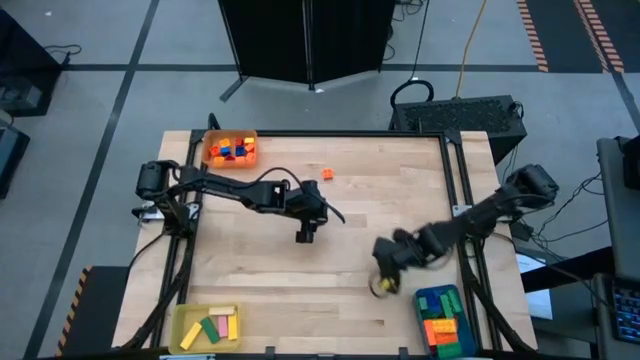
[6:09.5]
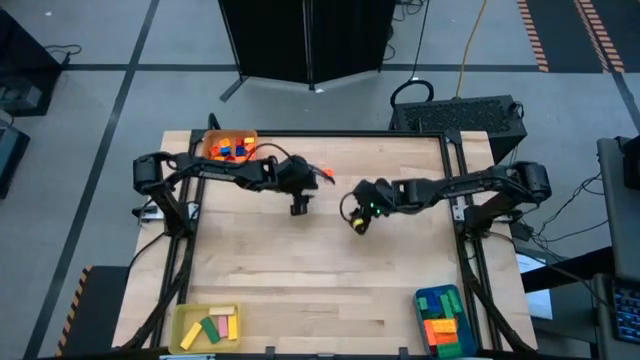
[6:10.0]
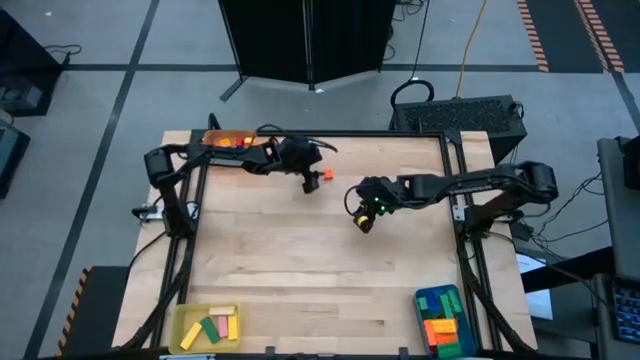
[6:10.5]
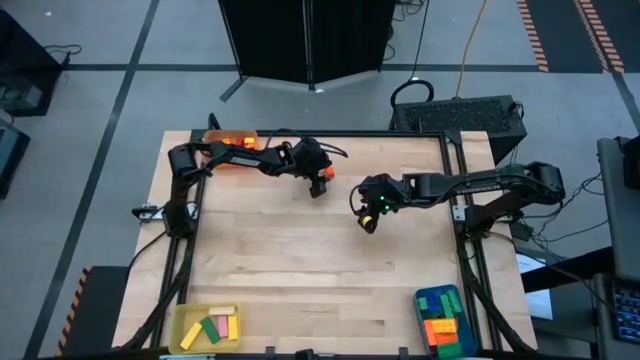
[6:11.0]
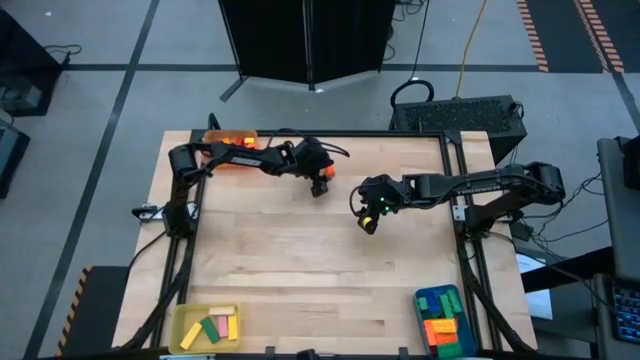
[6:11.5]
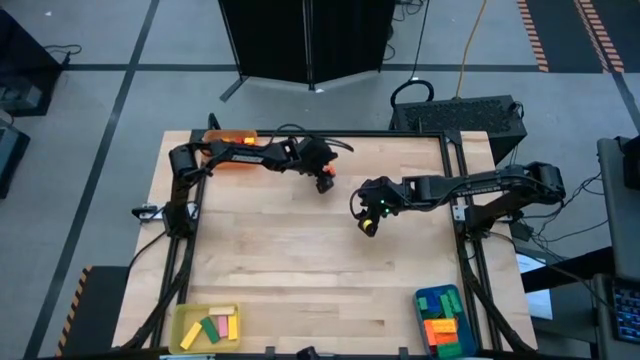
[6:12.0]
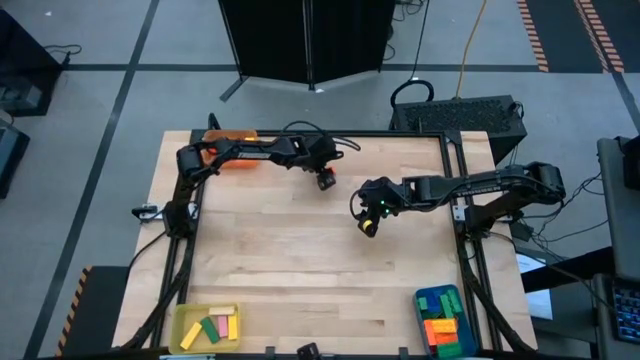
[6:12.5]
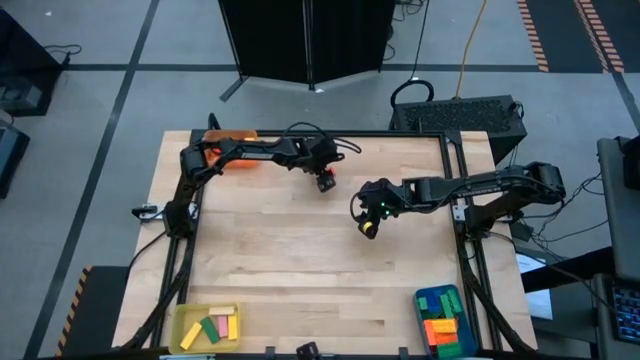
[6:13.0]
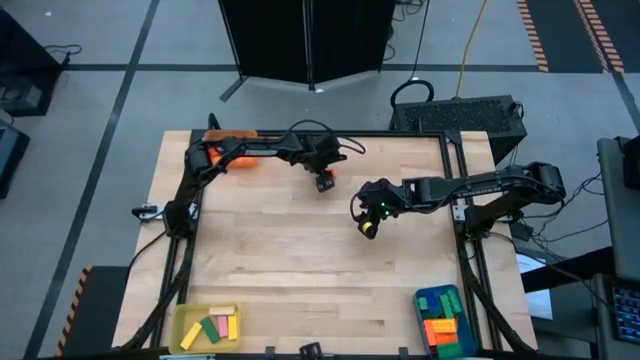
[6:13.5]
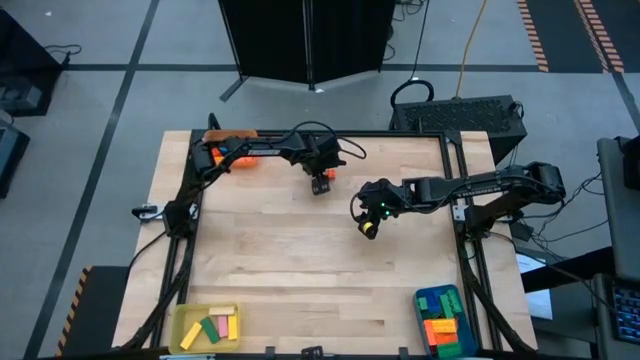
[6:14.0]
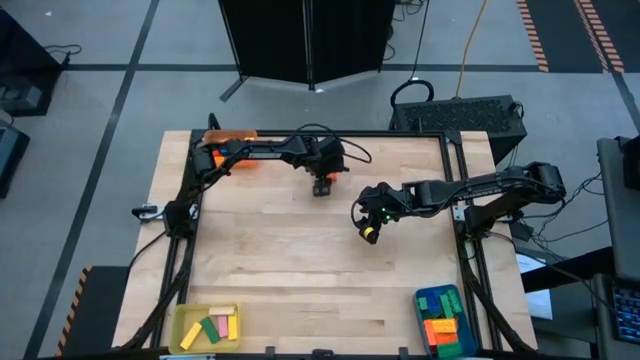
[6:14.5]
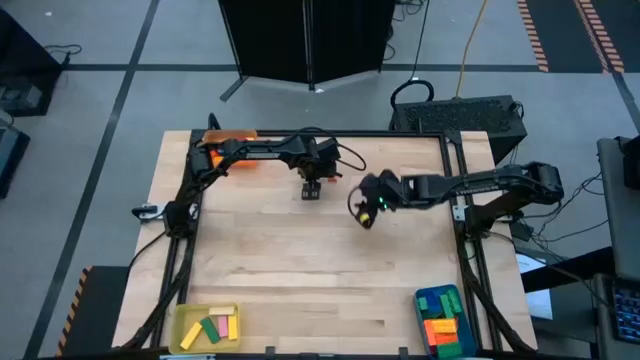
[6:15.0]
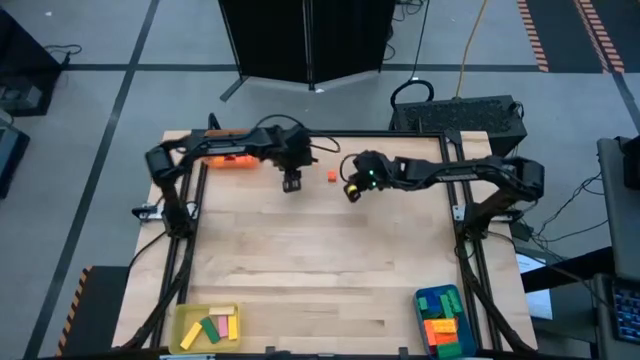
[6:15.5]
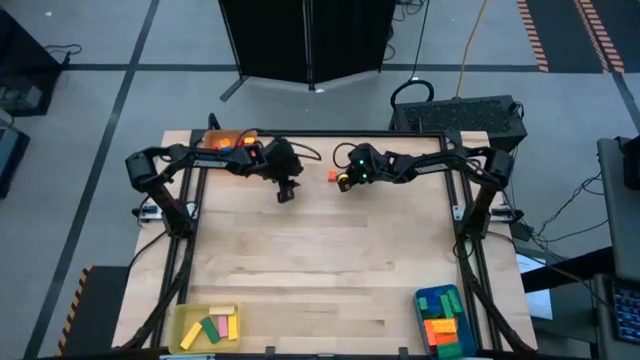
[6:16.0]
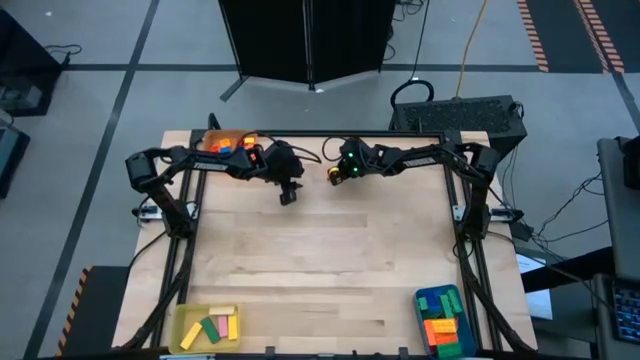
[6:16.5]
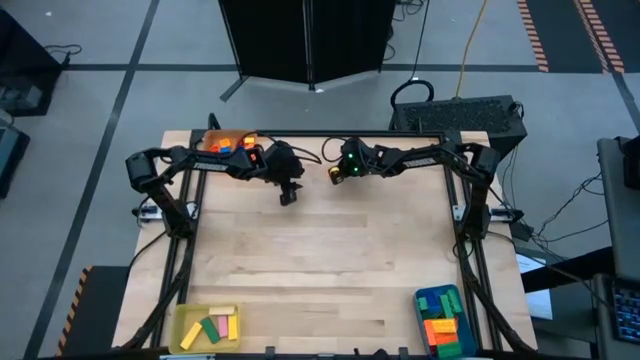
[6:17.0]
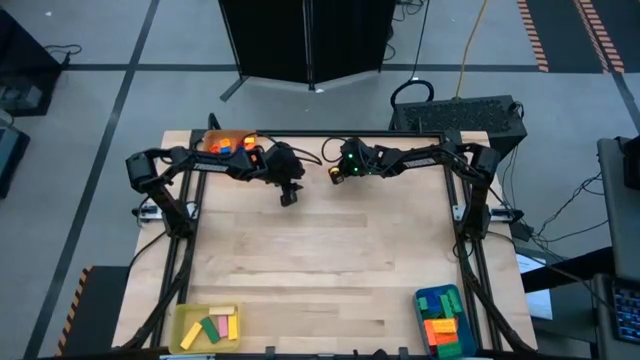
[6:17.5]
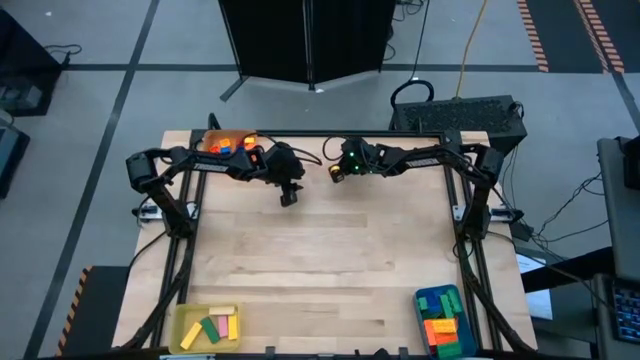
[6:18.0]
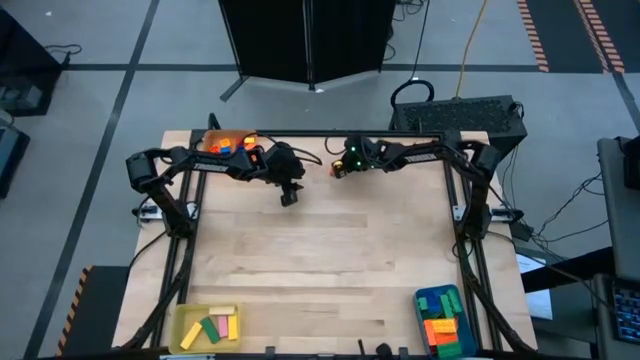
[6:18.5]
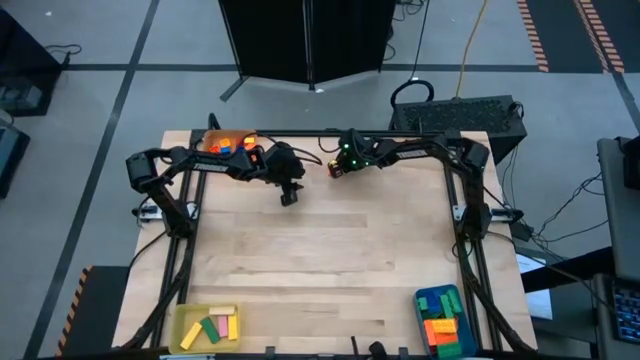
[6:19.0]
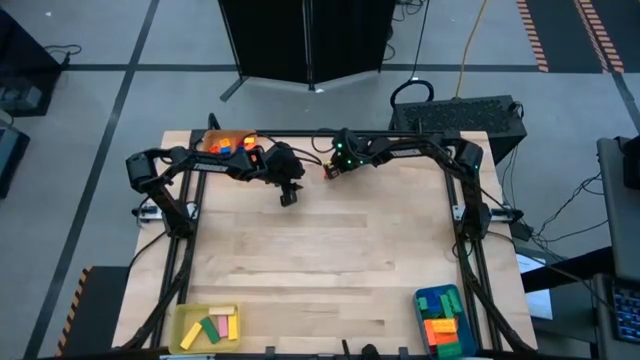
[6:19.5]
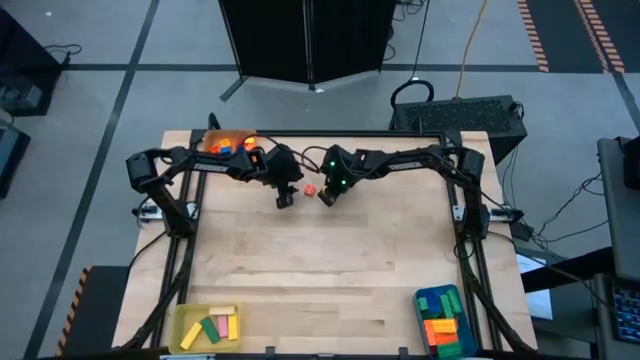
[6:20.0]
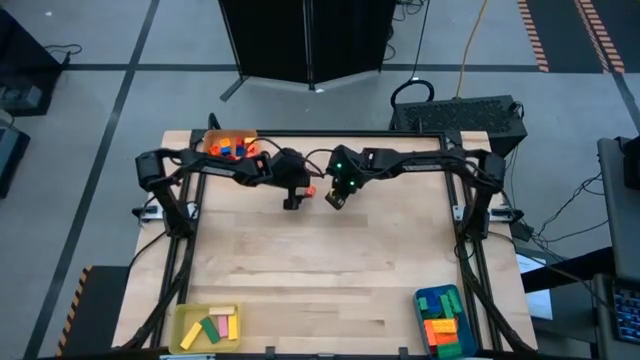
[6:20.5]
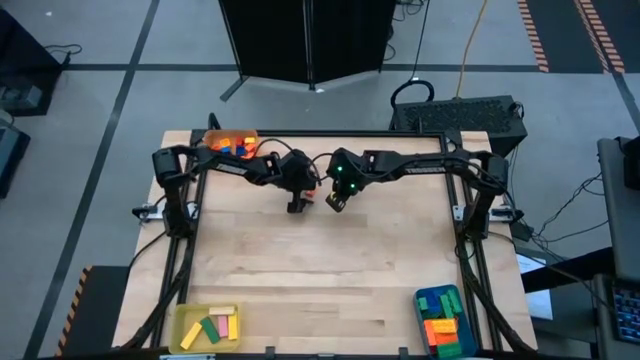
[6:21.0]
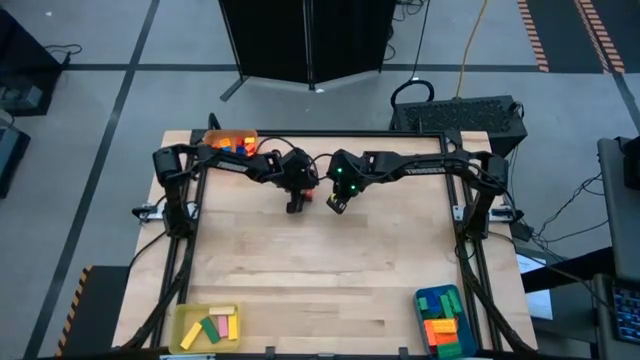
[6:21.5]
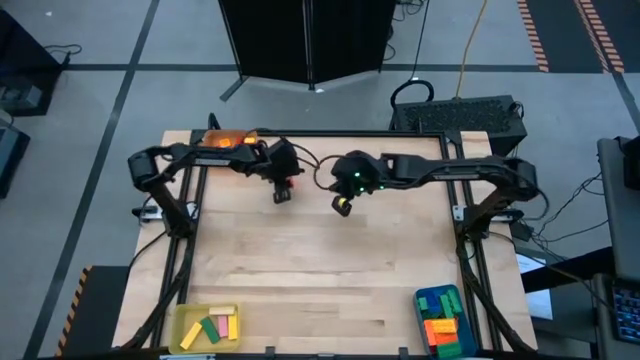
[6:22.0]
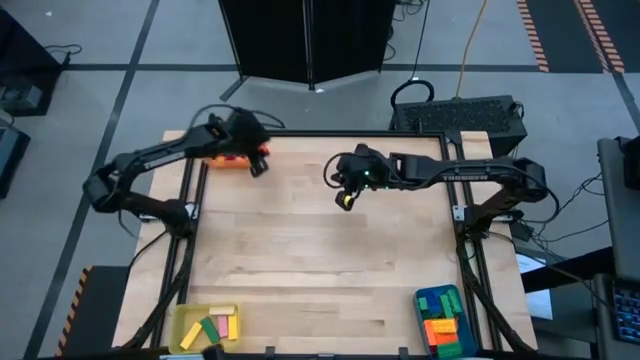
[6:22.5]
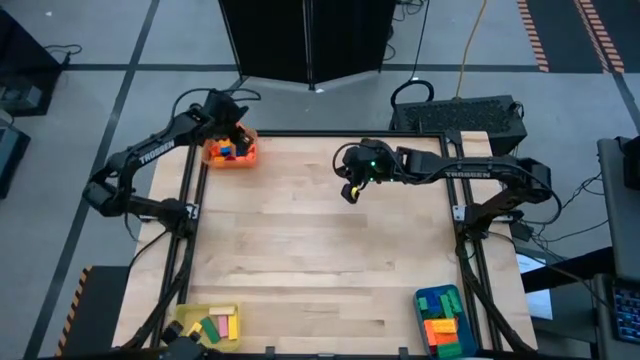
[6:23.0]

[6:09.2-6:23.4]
Task: Sort blocks by size
Put the orange 4 stud game piece into the orange bin

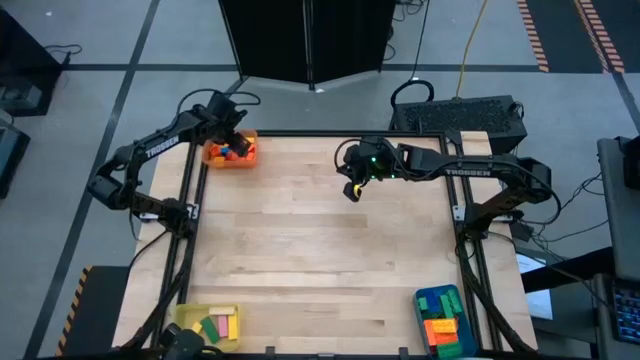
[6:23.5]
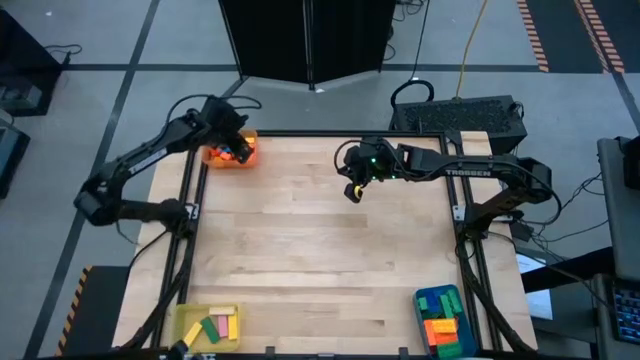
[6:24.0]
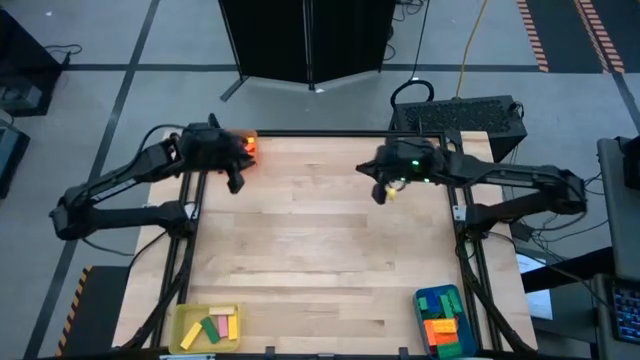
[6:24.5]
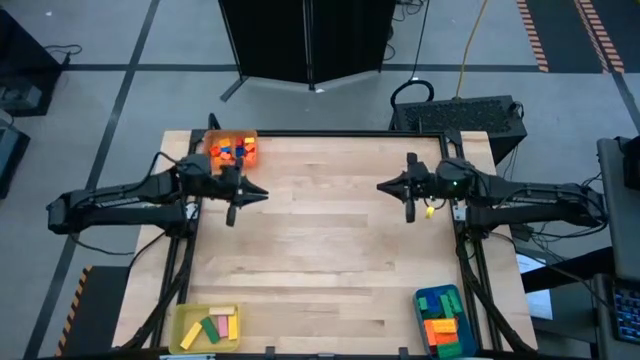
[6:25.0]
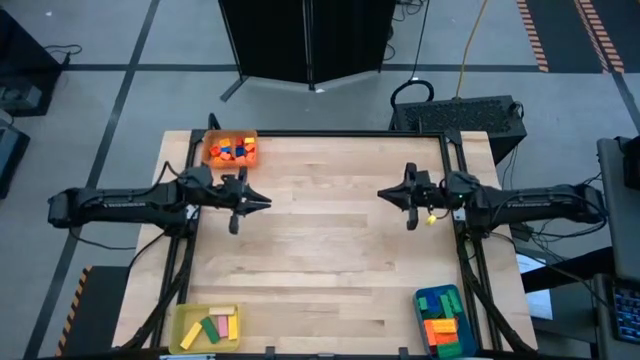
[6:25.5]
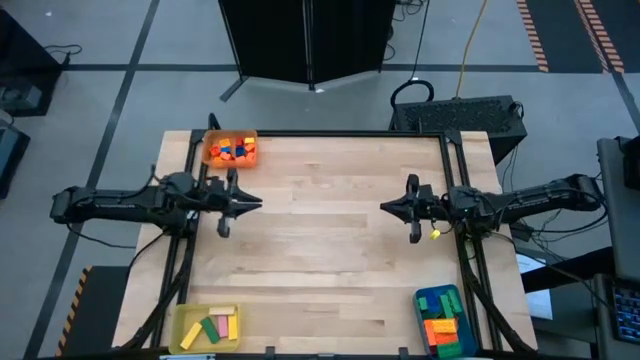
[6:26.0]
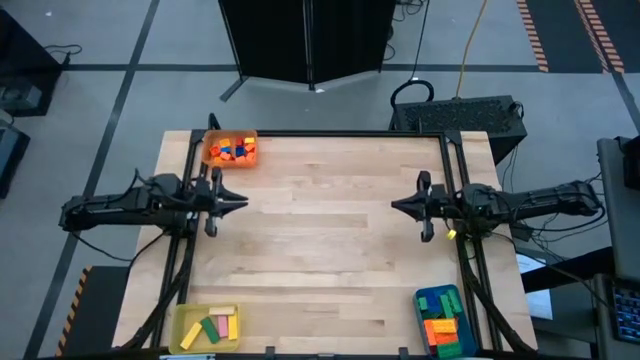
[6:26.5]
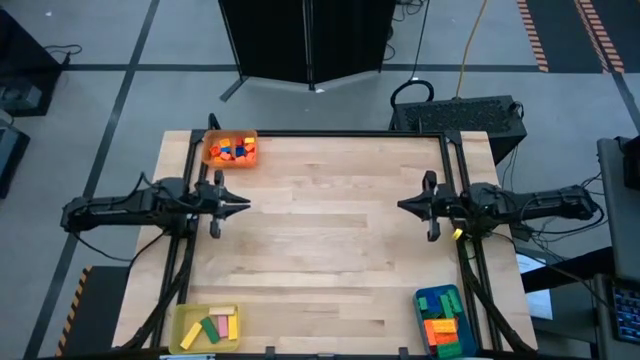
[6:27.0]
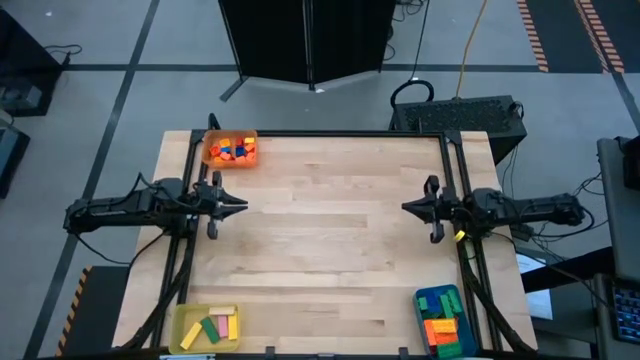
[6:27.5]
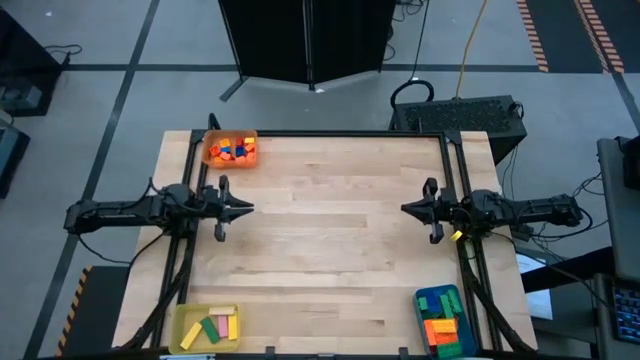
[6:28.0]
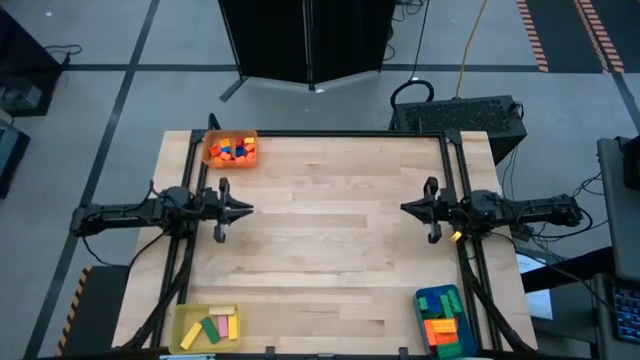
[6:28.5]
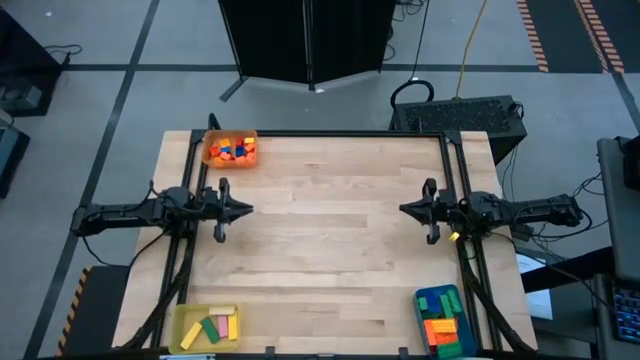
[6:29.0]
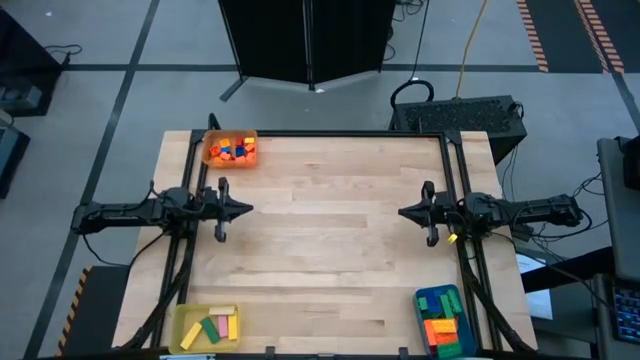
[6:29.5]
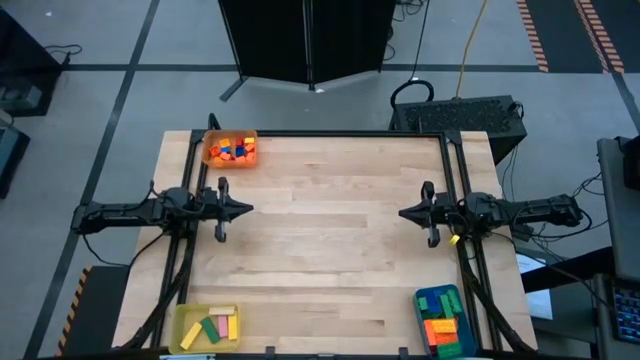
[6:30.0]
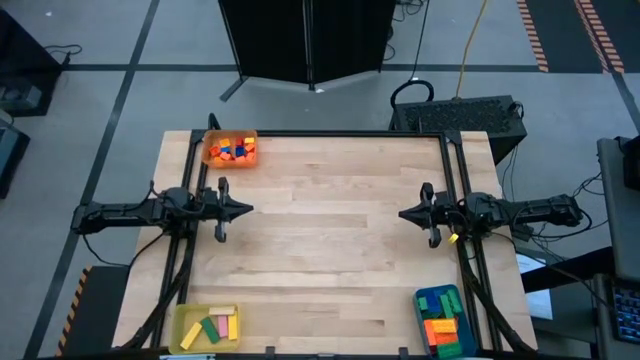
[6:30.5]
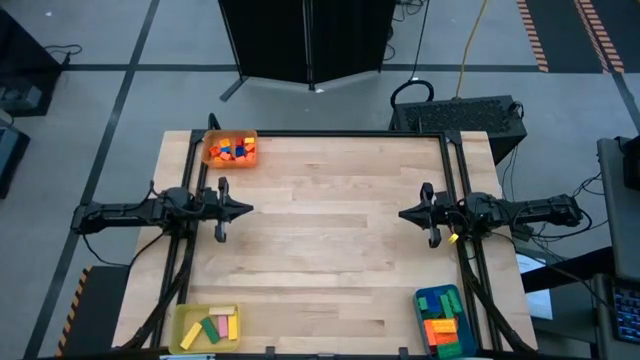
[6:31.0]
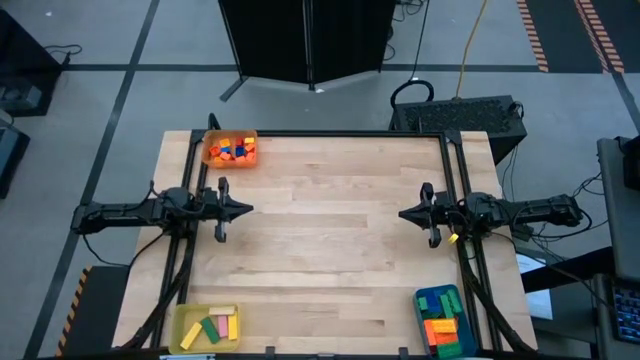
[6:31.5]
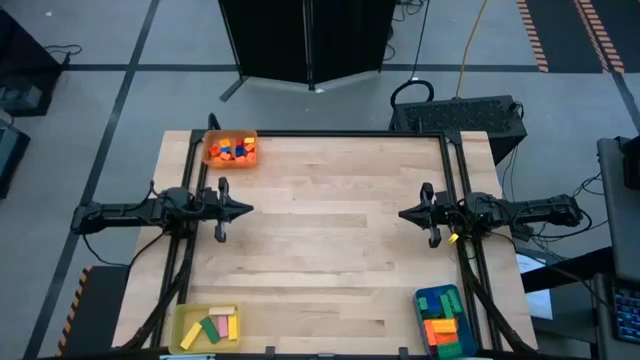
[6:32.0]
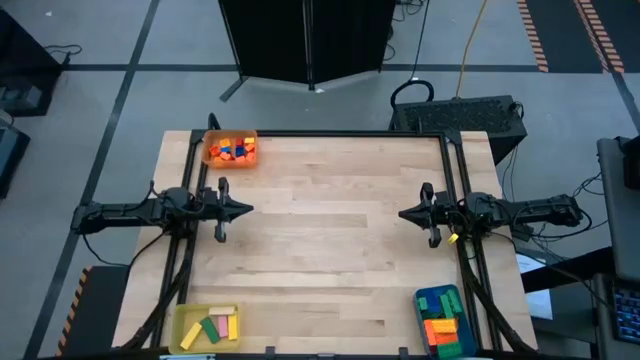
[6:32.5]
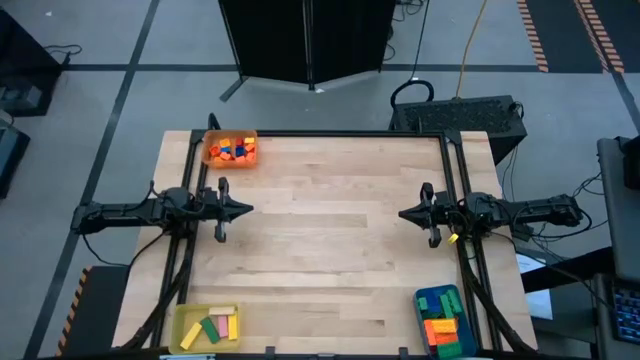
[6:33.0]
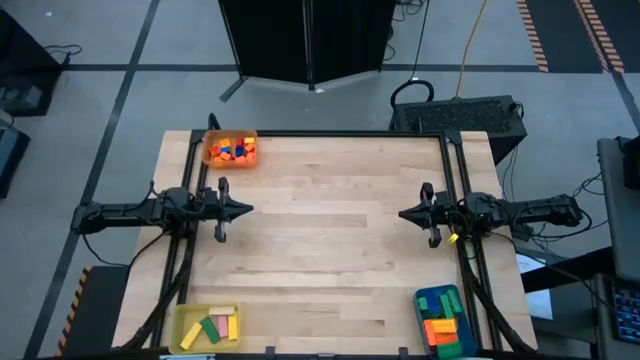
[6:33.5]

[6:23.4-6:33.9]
Return to Home Position
